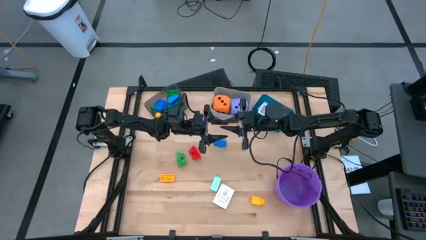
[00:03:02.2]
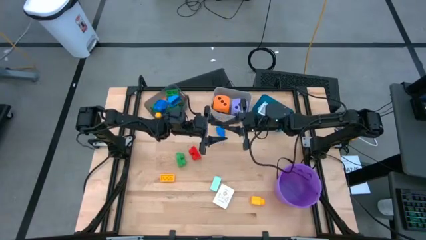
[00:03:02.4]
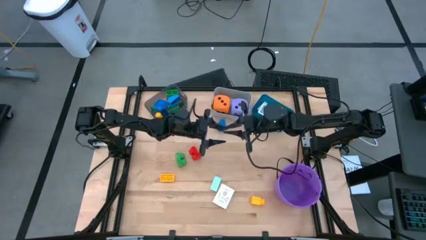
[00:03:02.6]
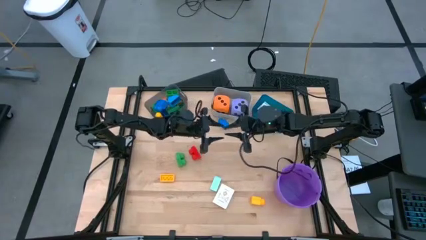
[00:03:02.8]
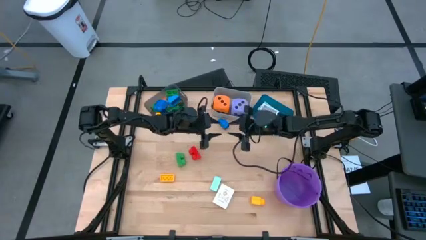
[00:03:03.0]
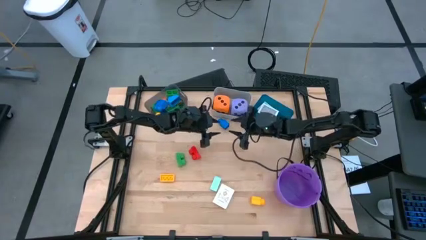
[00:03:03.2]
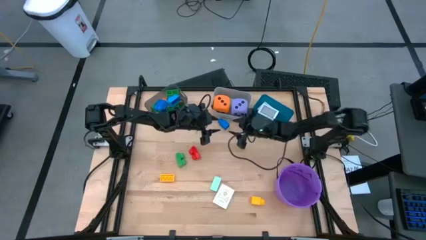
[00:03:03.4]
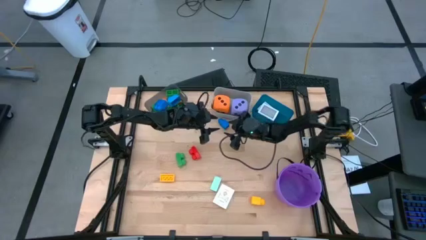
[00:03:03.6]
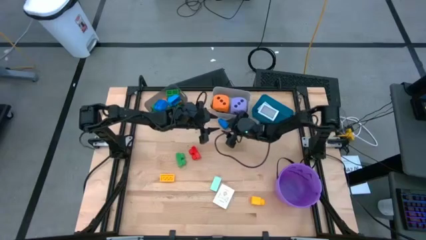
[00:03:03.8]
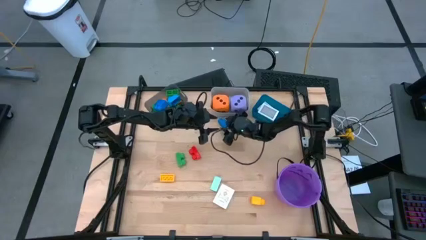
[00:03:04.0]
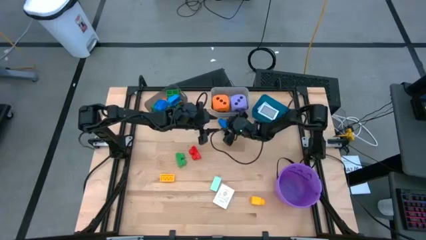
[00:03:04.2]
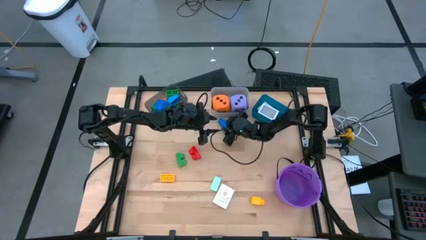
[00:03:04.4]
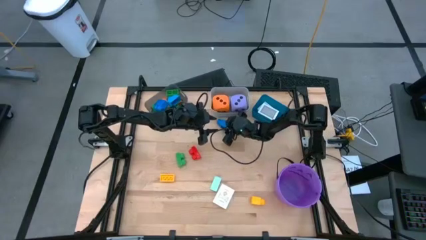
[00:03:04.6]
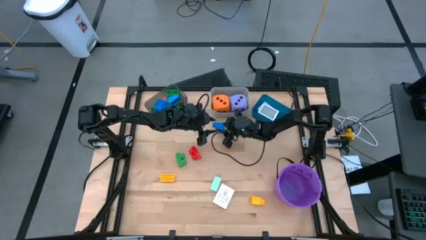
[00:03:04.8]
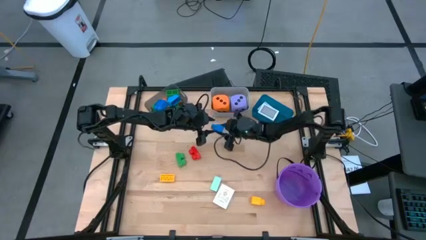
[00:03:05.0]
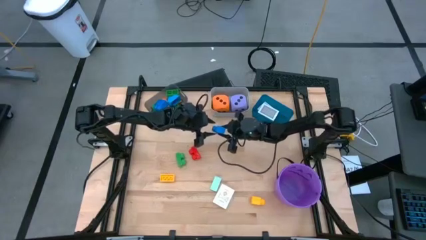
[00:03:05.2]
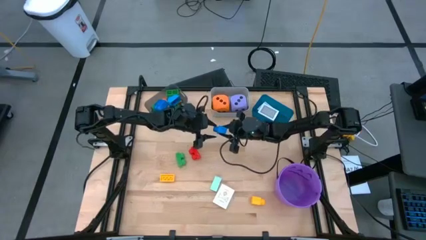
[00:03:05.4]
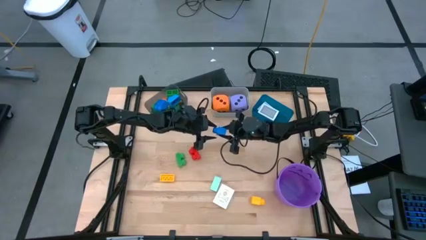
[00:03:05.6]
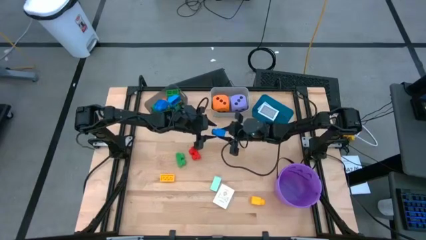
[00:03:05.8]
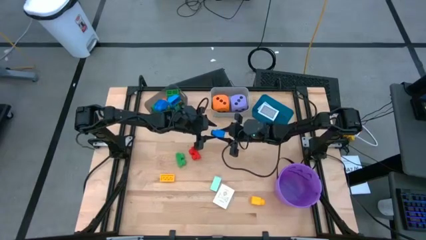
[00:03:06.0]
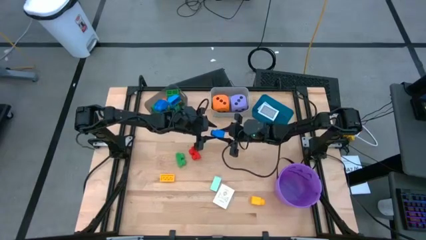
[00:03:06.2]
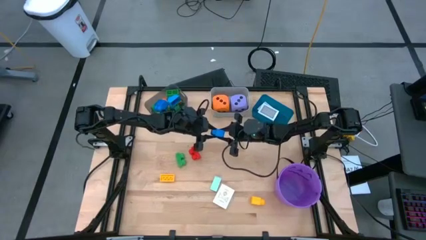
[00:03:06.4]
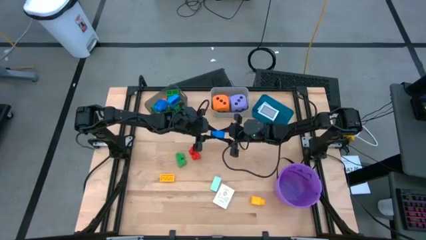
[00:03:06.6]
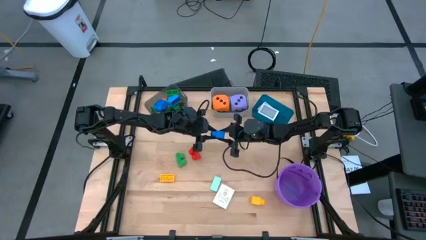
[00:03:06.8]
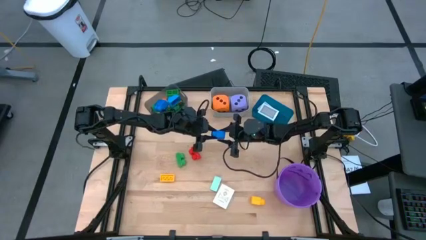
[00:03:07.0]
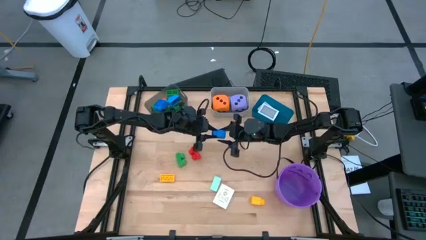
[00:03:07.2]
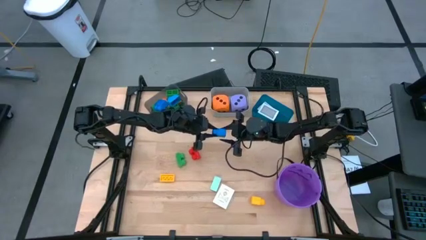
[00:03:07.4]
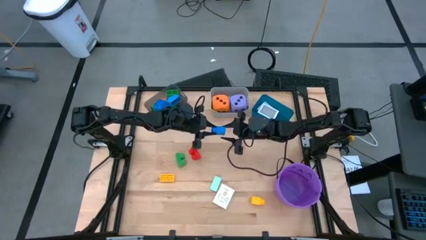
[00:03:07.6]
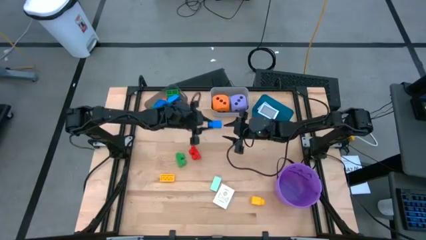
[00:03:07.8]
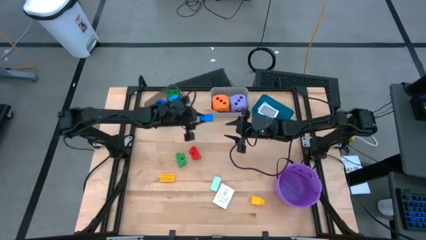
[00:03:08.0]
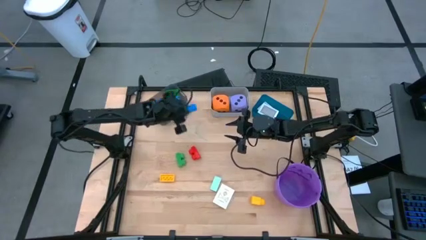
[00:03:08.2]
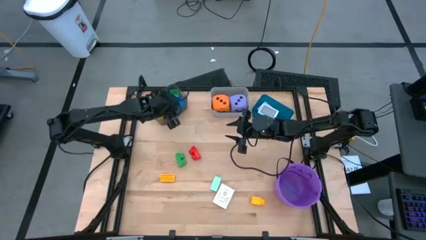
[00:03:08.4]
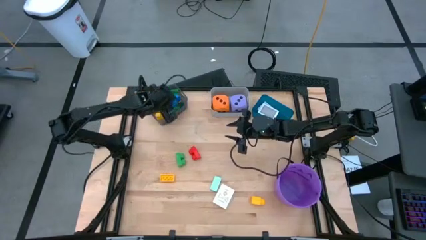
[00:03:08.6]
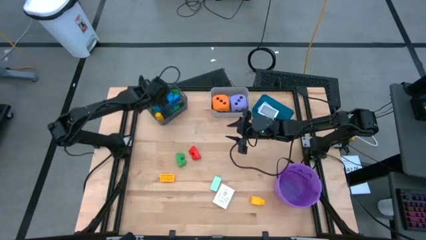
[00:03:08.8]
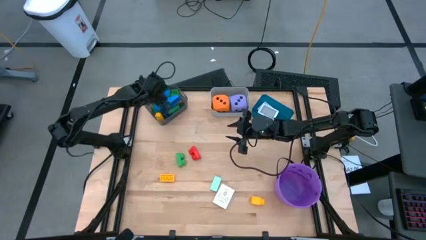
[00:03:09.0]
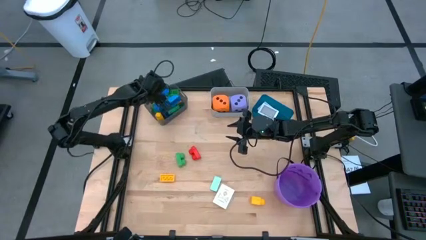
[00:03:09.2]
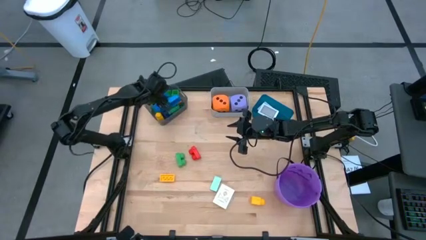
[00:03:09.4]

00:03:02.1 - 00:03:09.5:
Task: Pick & Place Toys
Put the blue gamepiece into the black bin

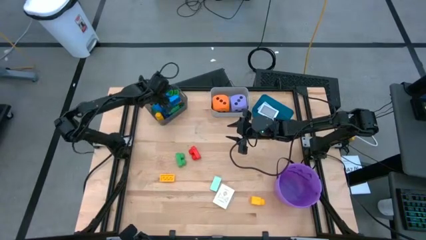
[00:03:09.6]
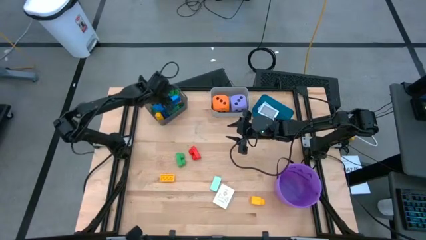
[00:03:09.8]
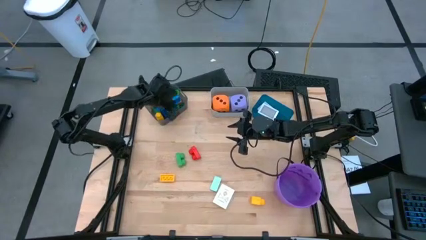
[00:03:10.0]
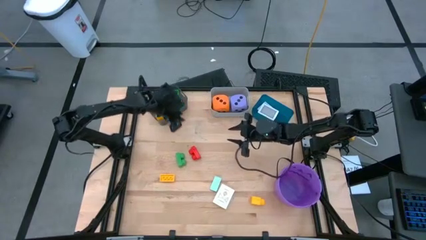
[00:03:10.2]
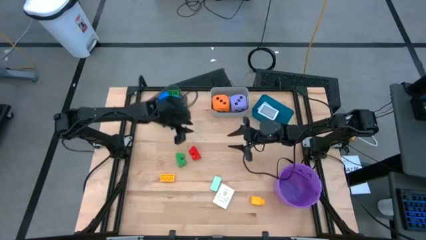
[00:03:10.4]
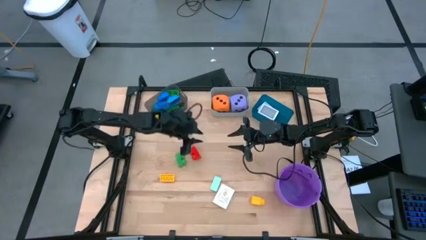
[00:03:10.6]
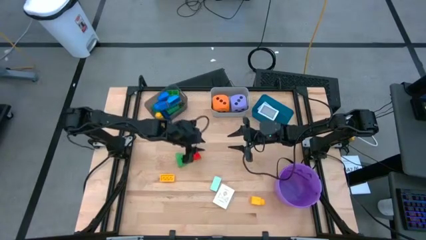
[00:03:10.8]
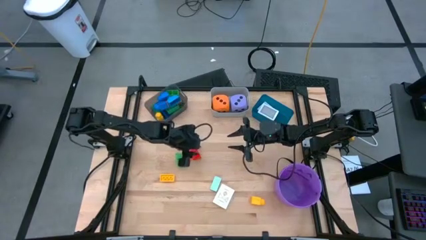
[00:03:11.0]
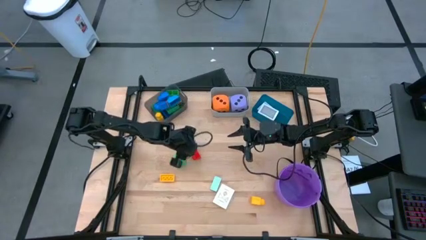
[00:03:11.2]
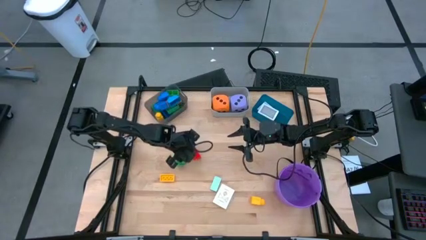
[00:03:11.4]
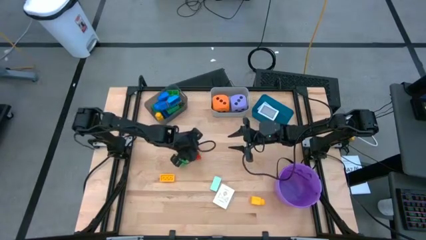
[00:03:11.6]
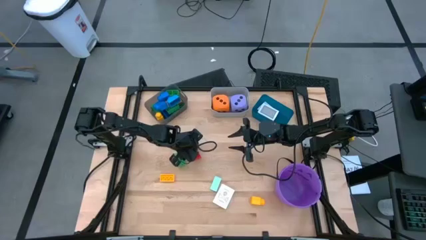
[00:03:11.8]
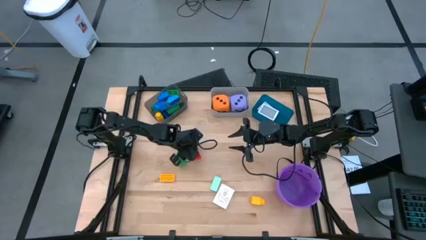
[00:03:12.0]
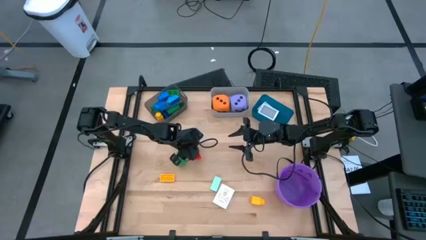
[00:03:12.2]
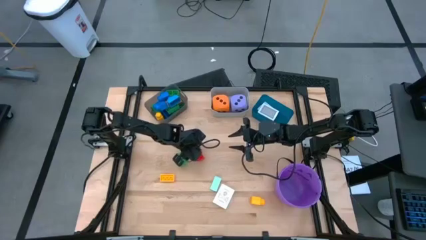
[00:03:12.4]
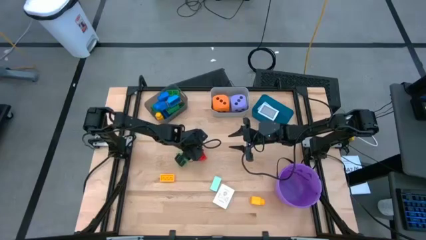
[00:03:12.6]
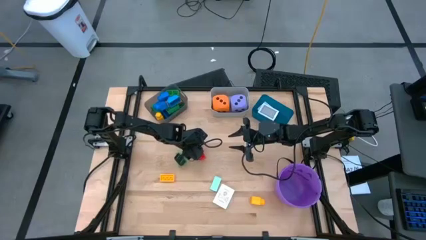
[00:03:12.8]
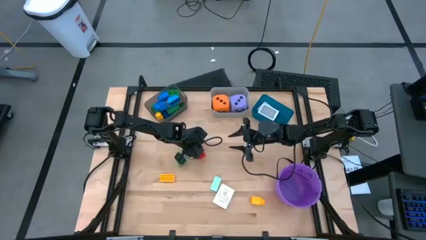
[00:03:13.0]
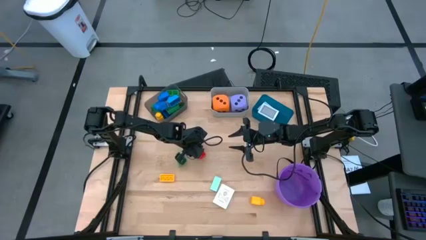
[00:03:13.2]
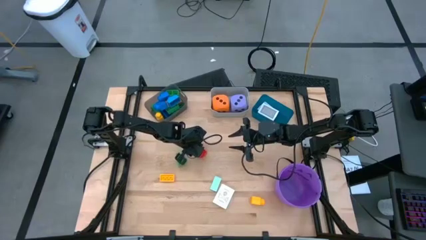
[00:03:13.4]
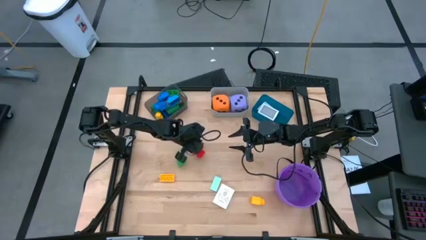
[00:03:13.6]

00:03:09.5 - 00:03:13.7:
Put the red gamepiece into the black bin

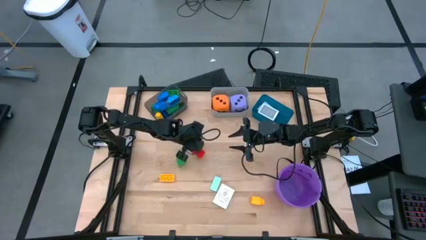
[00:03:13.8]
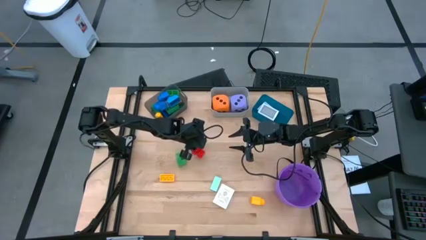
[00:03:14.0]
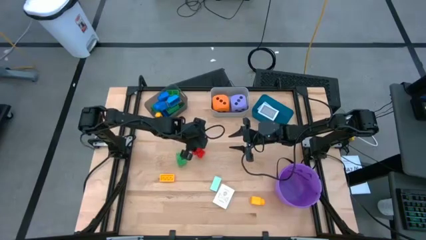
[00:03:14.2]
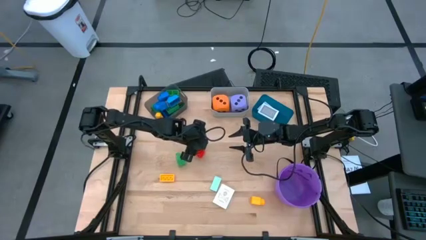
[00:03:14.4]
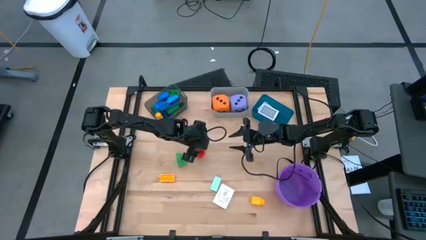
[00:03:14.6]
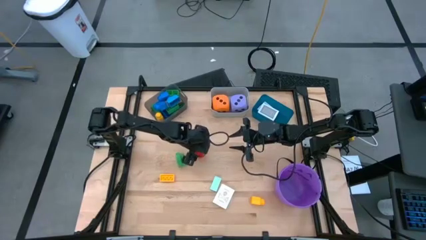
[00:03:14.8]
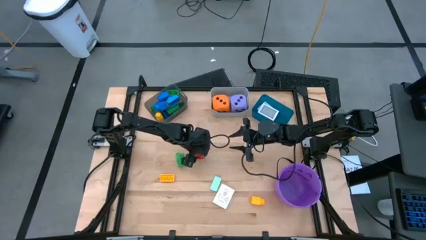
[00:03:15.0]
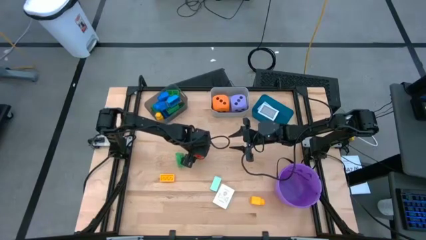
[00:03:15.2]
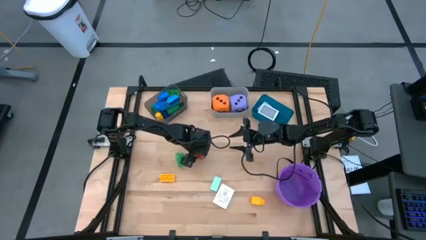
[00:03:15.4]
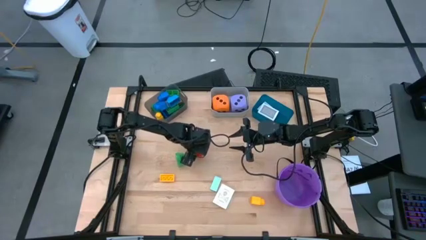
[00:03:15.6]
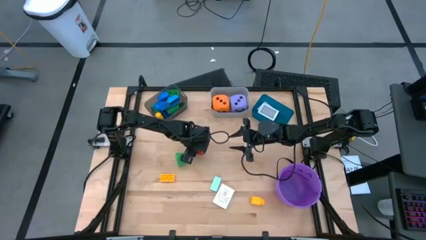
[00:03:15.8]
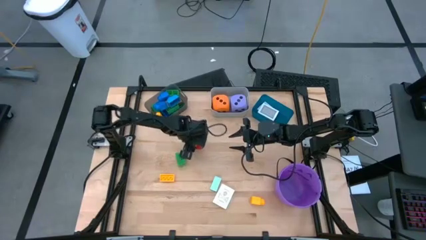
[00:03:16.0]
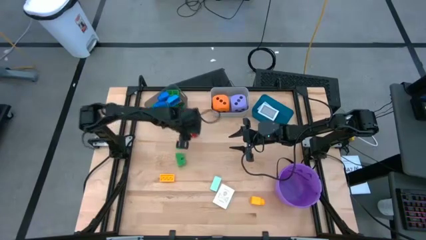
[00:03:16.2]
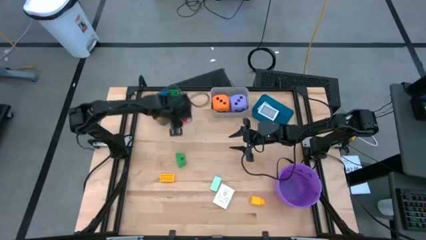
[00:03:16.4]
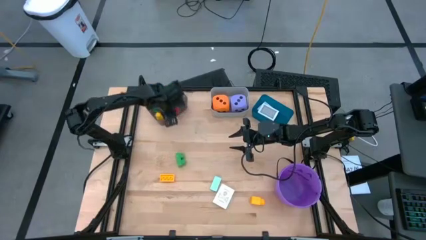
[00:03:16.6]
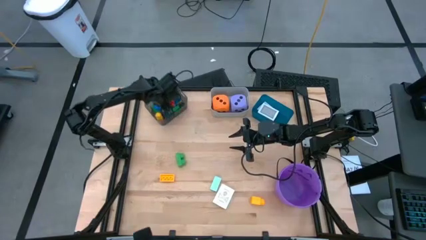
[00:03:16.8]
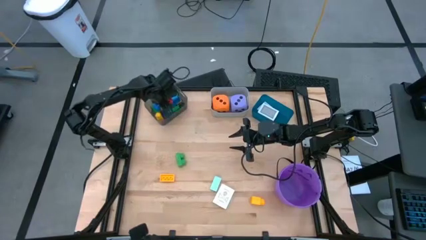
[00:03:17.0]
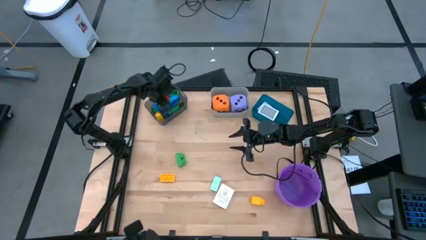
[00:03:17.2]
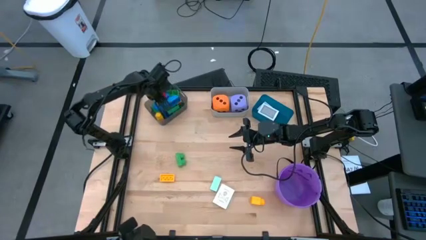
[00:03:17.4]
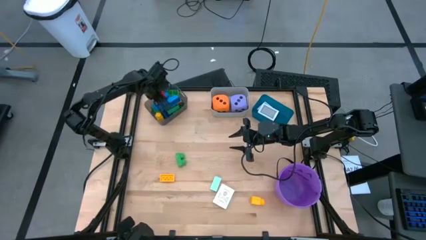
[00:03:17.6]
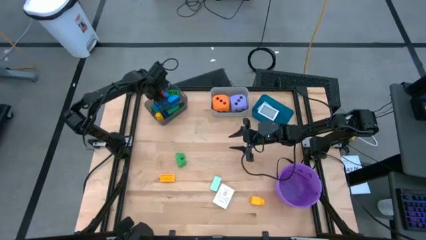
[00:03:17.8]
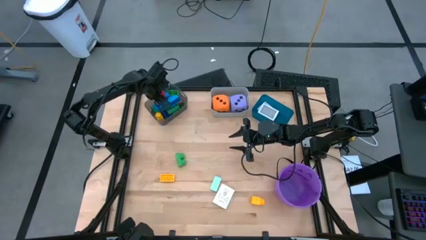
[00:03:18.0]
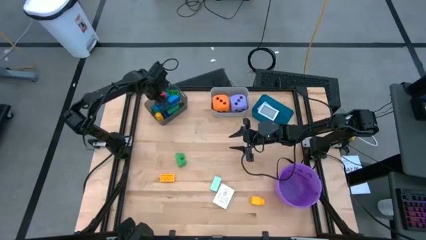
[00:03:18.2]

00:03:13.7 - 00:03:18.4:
Put the red gamepiece into the black bin
